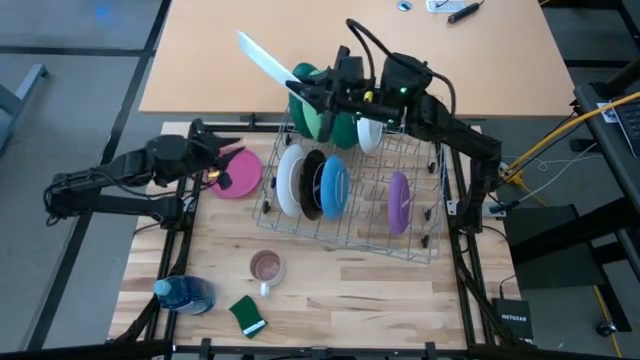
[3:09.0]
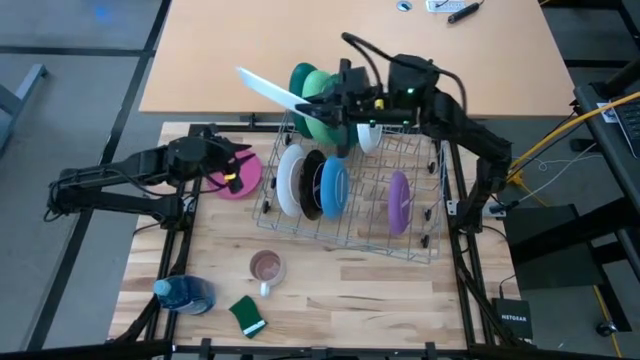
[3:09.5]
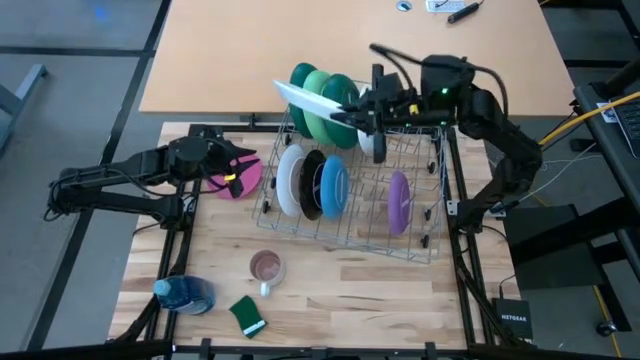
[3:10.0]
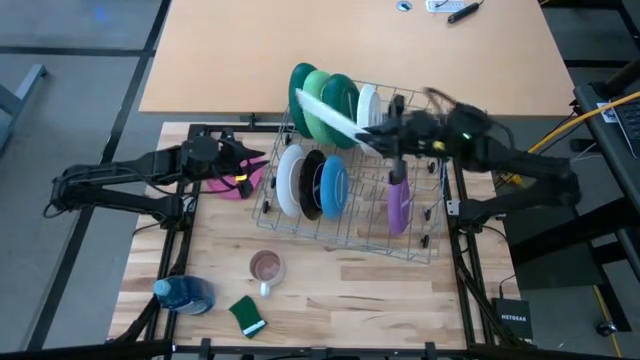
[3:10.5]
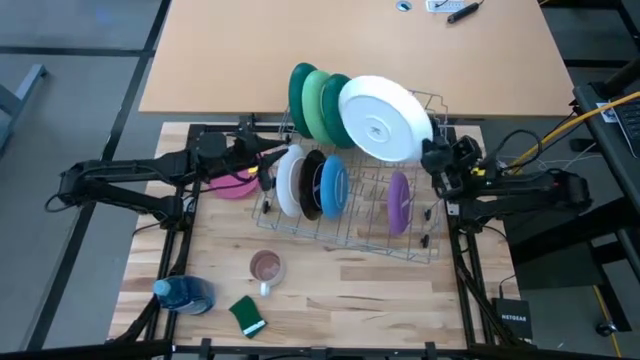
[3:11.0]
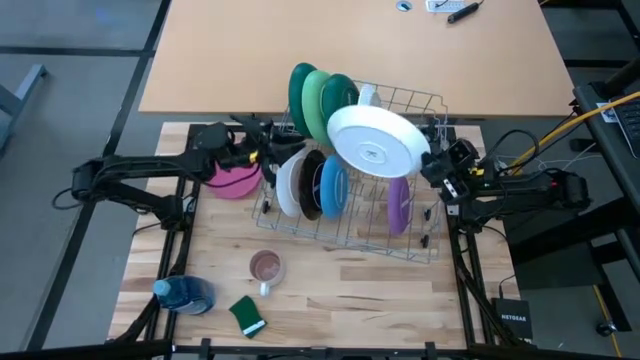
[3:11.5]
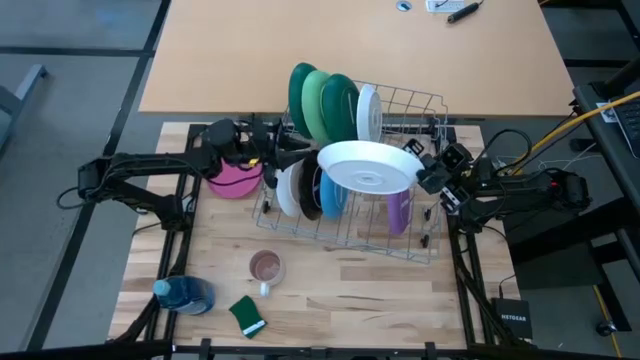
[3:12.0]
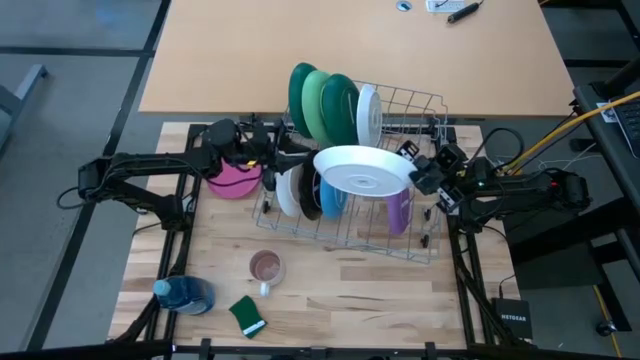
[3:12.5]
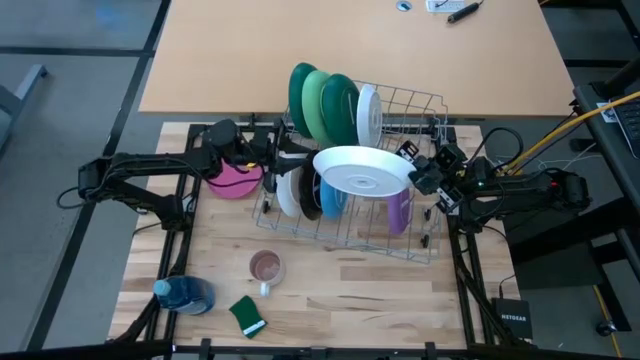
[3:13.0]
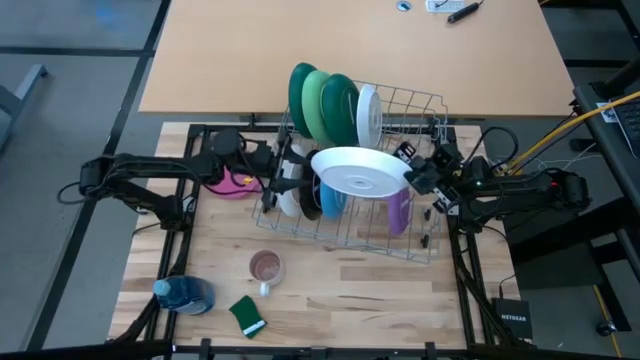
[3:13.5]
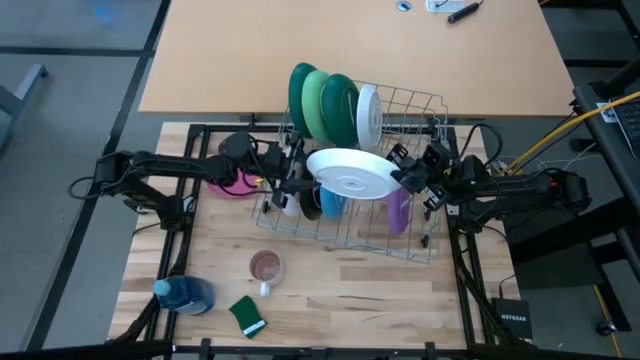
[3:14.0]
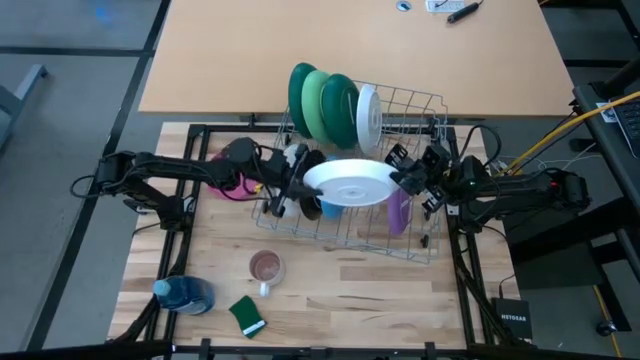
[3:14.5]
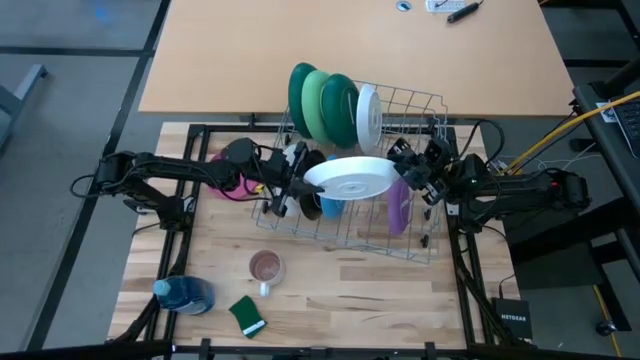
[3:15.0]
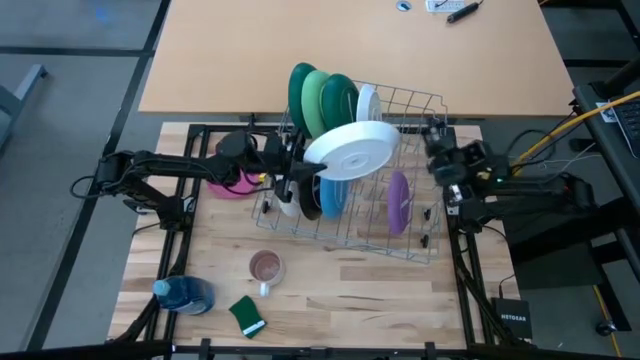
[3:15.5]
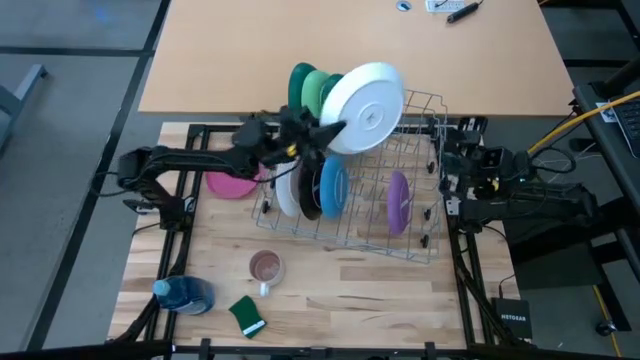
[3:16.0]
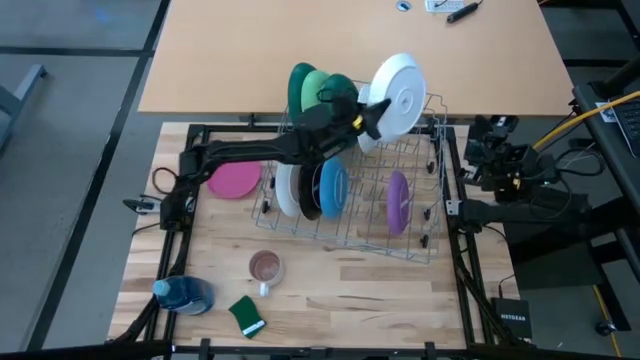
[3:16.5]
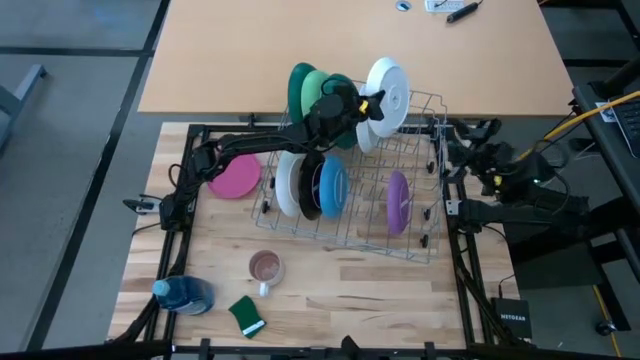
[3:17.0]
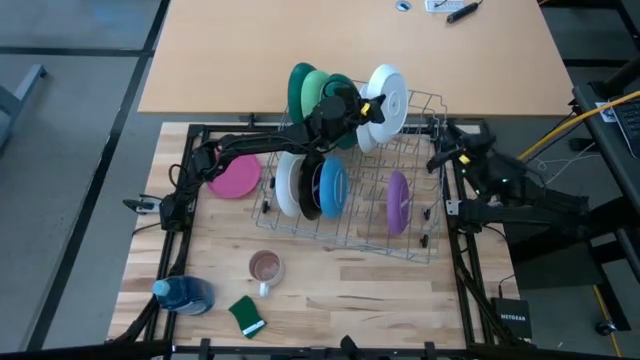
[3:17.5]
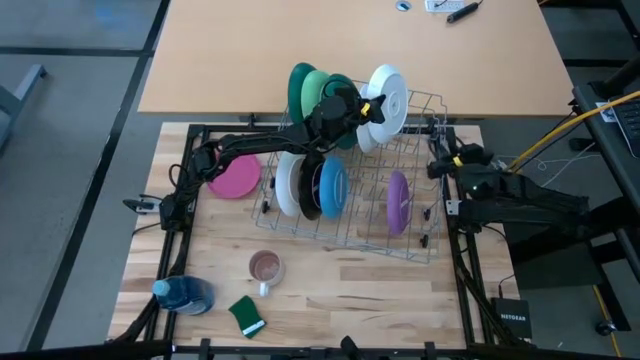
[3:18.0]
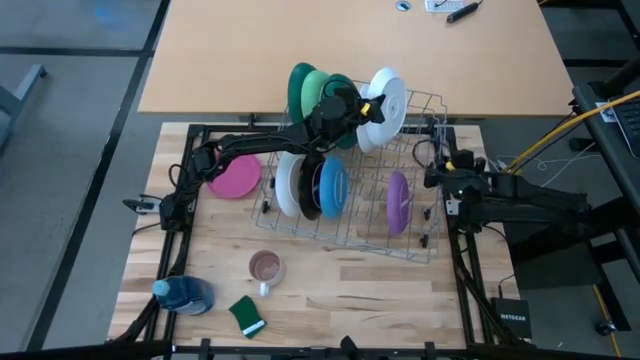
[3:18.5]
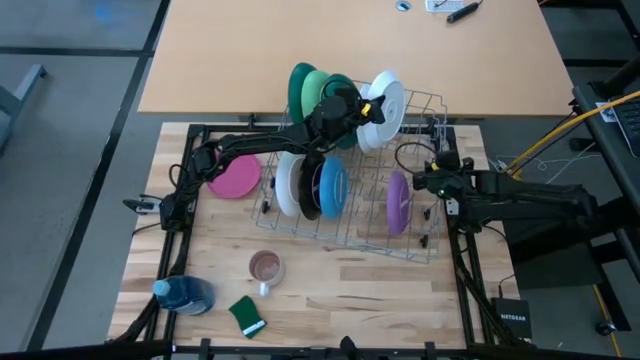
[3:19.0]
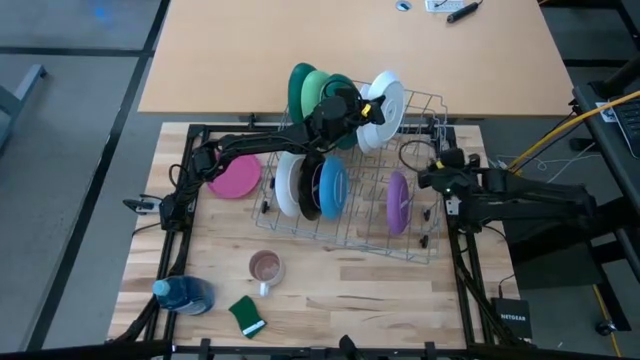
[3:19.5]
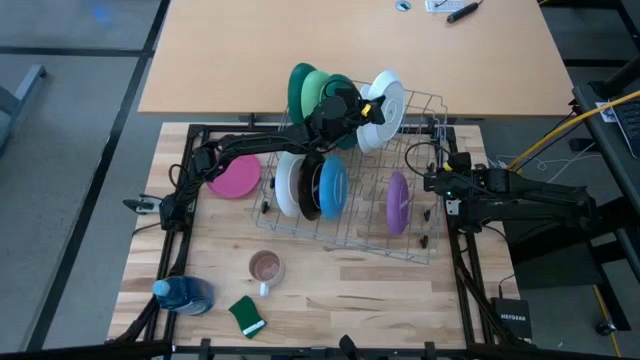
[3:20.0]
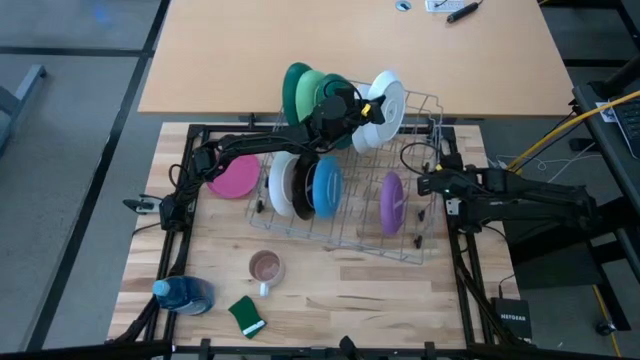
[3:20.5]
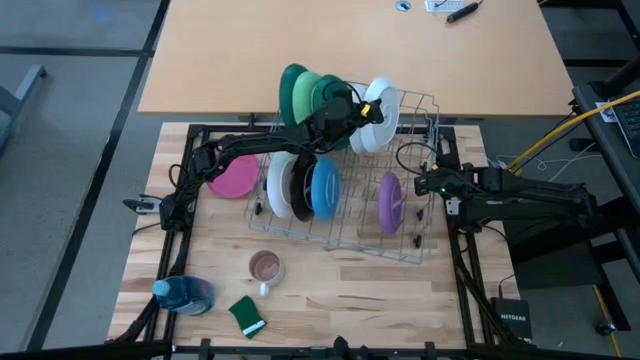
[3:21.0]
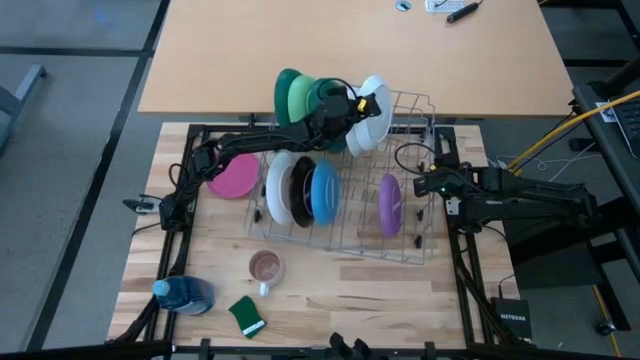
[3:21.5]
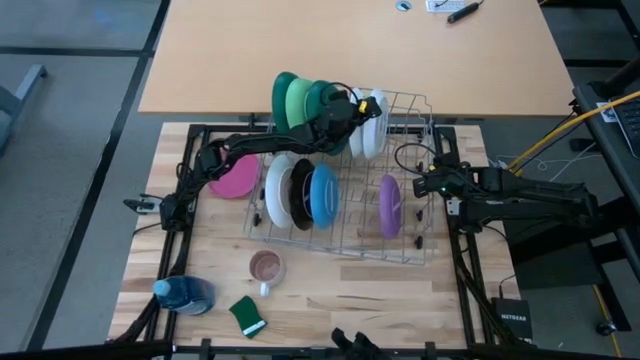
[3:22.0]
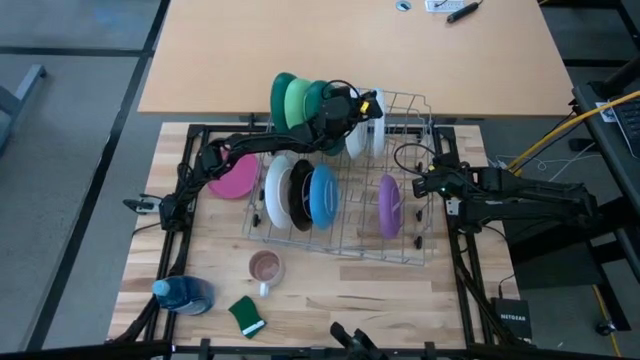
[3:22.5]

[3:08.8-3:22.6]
Task: Sort dishes
Put the white plate into the dishwasher rack

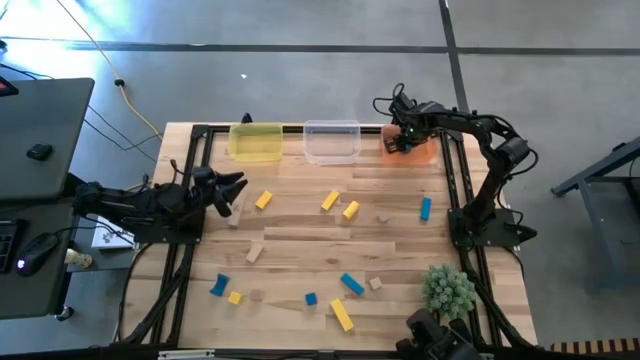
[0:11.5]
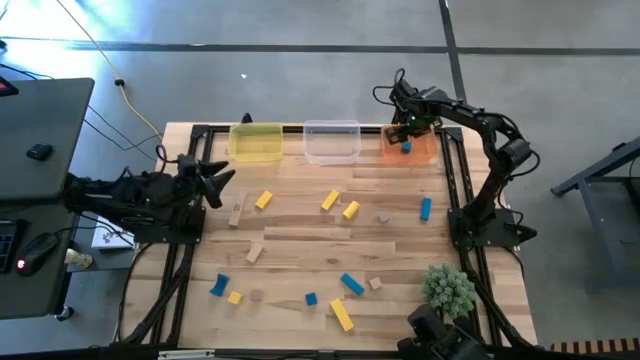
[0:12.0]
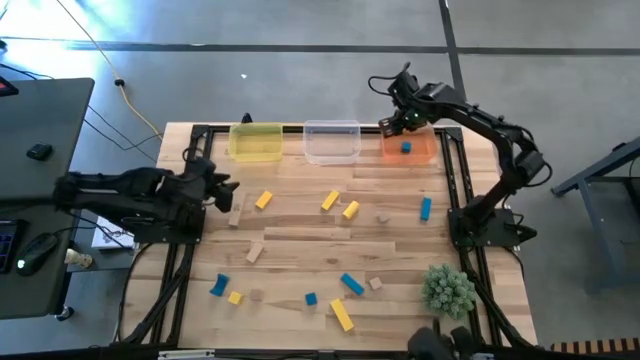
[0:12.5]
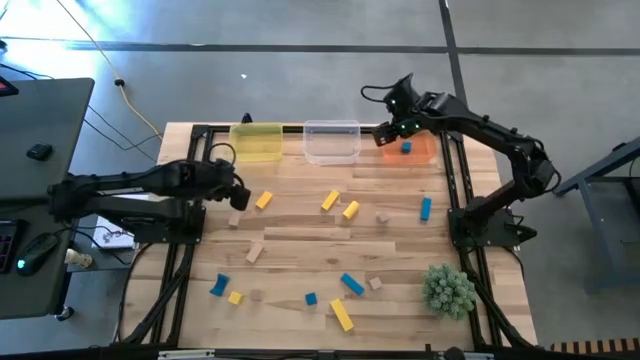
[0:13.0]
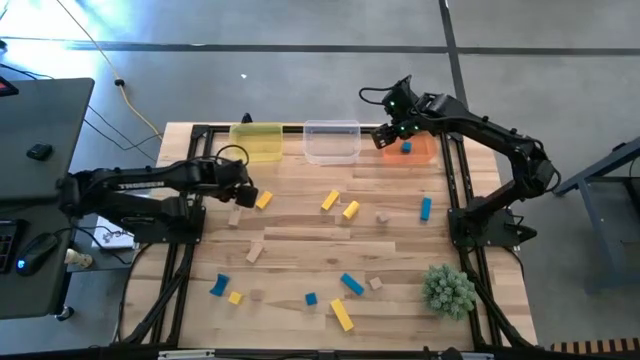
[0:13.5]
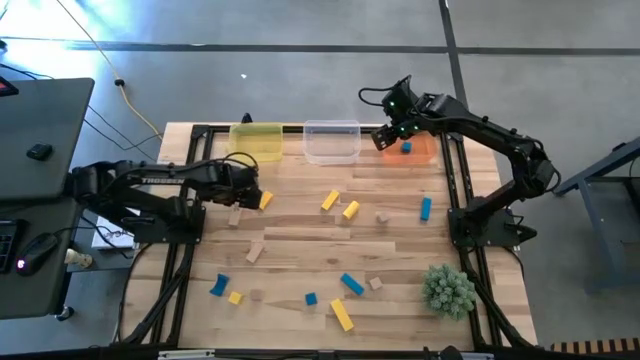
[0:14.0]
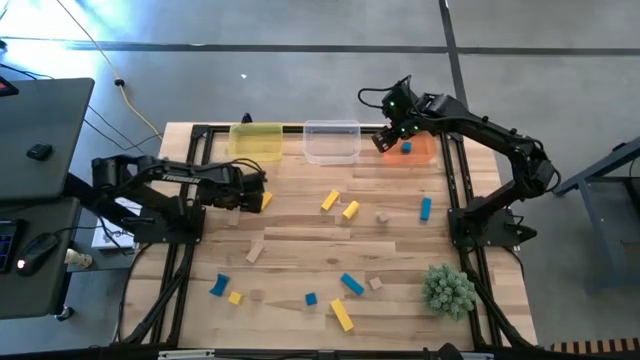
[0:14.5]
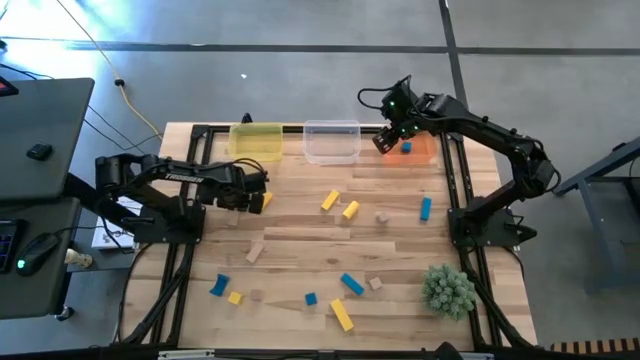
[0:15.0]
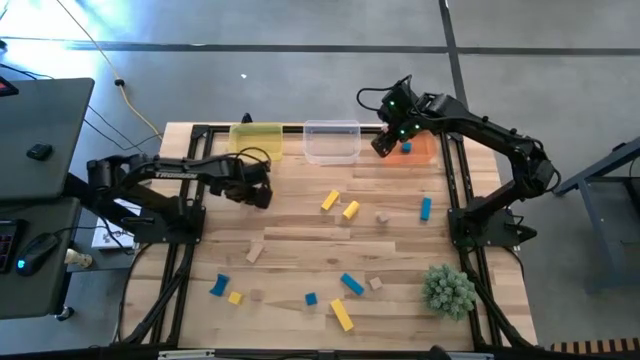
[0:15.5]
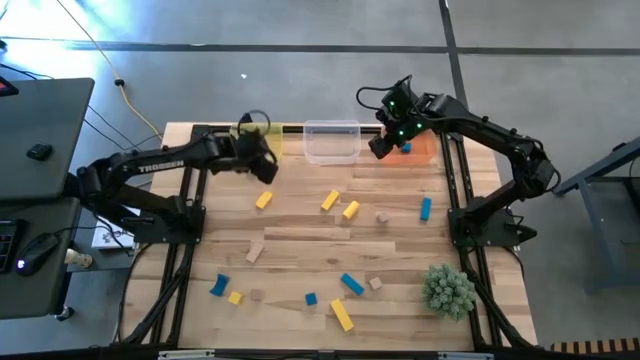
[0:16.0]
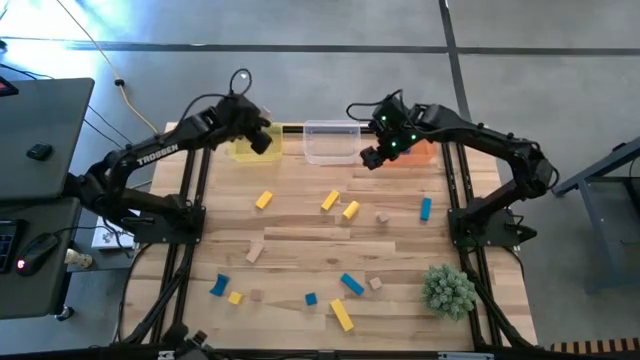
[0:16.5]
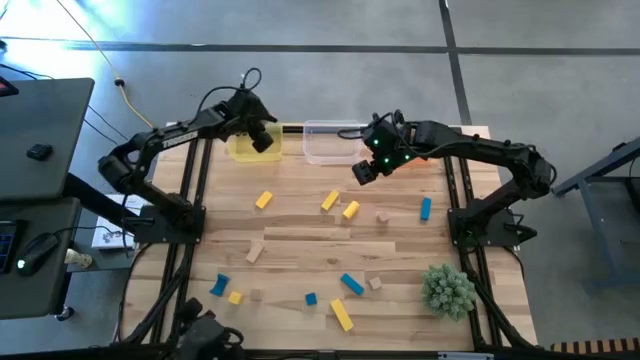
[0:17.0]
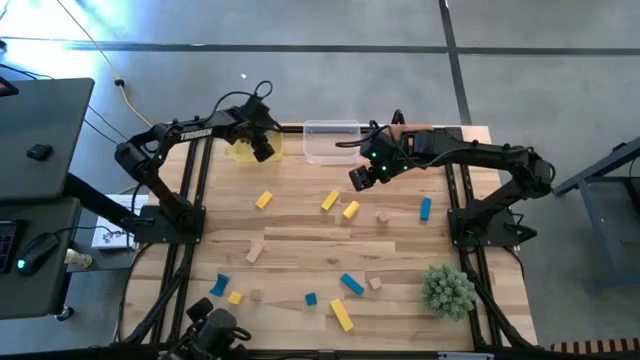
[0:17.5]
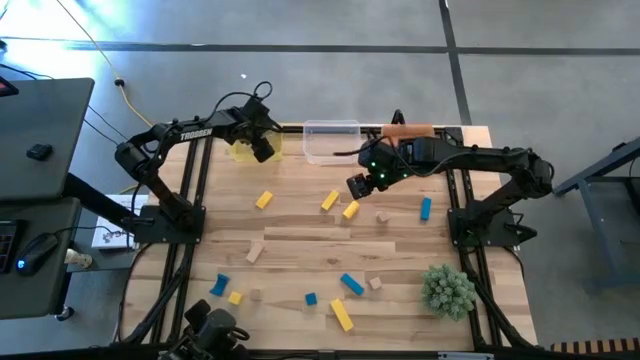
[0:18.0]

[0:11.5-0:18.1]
Task: Sort & place blocks by color
Put the brown block into the yellow bin
